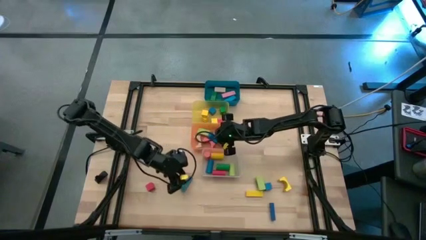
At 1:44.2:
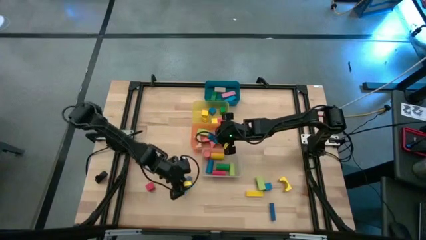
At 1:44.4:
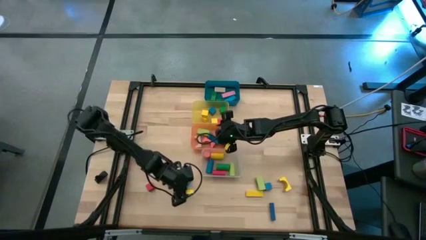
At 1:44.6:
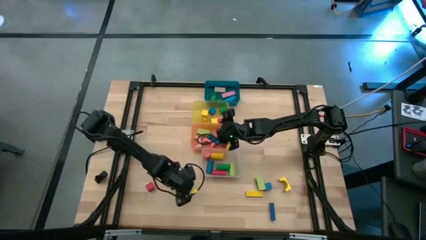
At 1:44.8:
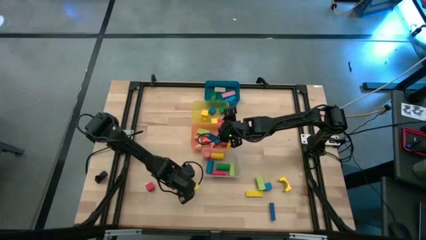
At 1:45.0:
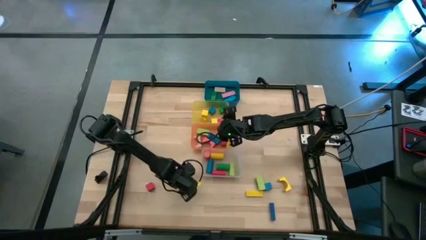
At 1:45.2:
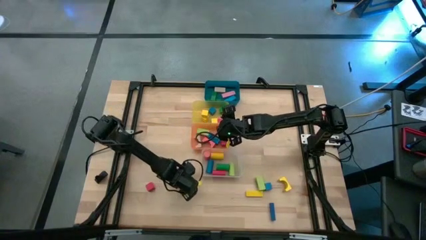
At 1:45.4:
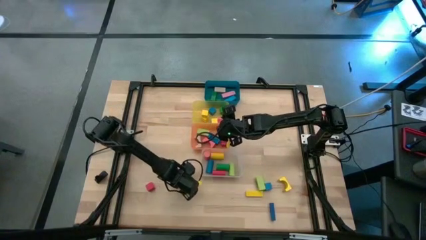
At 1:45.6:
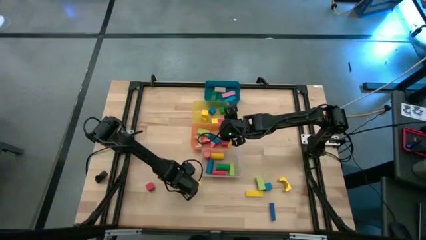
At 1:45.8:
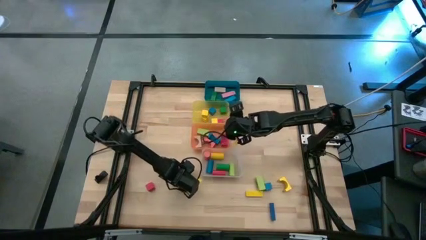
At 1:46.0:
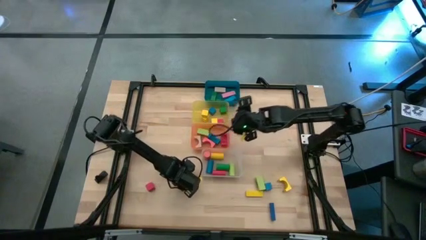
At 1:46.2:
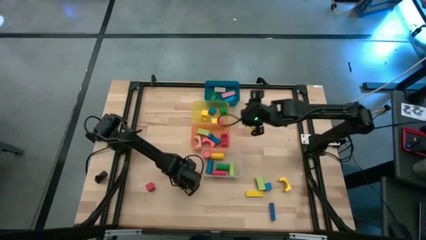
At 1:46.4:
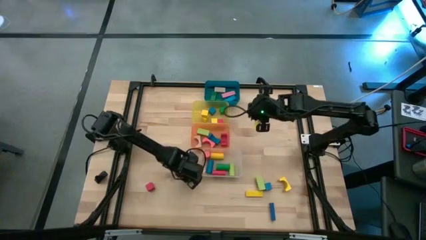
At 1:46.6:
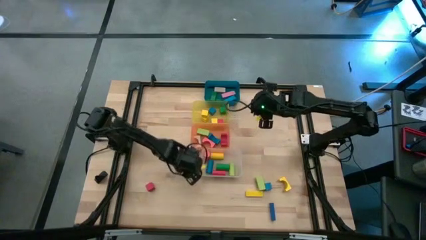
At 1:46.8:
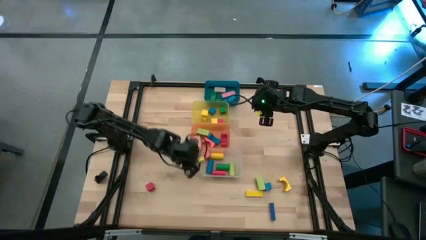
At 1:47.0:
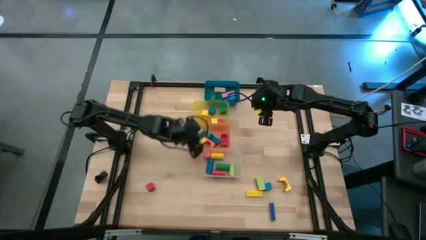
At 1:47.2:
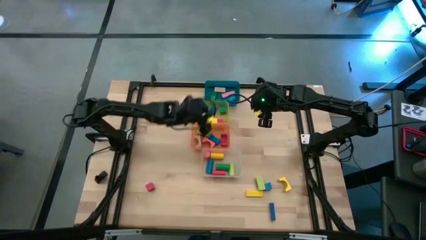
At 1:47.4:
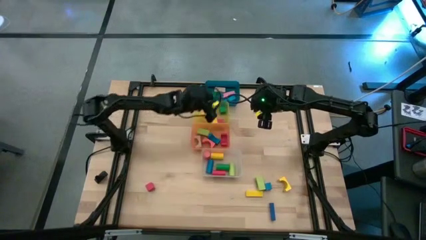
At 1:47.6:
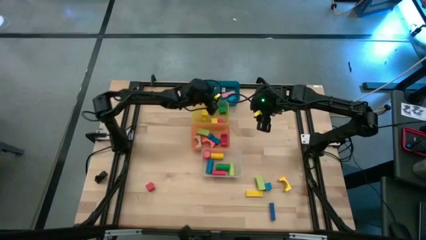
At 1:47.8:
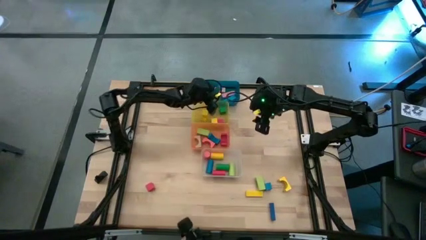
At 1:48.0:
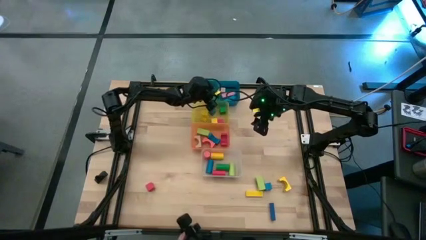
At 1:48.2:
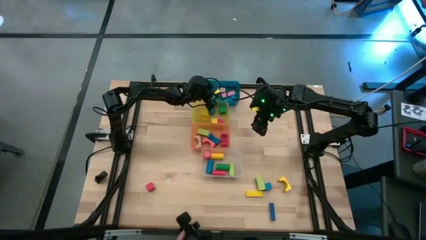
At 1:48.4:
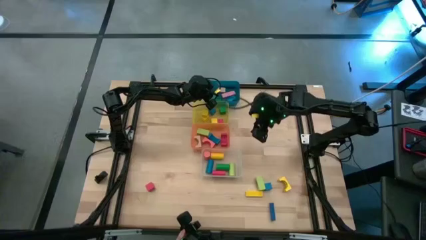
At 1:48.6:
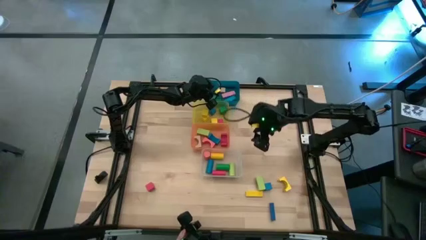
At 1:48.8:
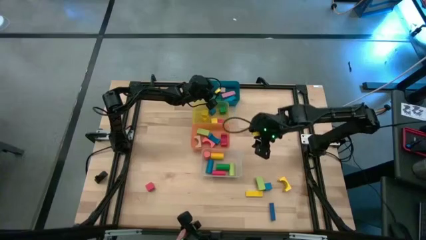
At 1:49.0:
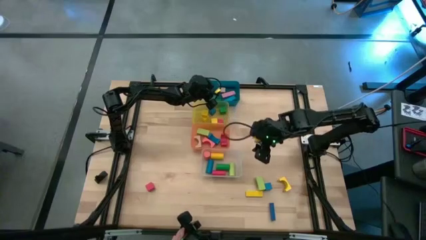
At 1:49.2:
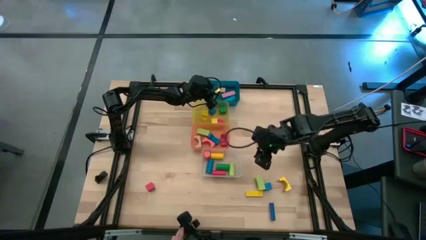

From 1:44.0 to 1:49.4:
Task: Sort blocks by size
Put the light blue rectangular block into the blue bin

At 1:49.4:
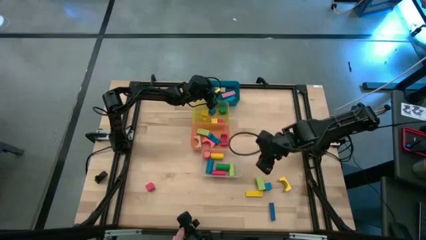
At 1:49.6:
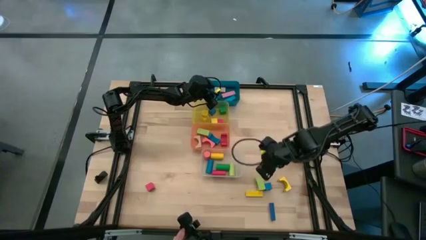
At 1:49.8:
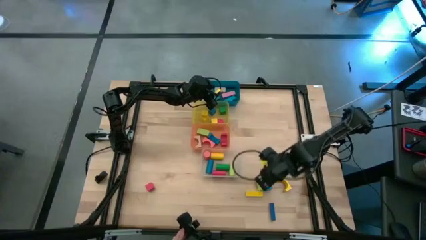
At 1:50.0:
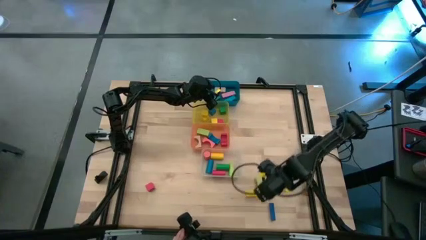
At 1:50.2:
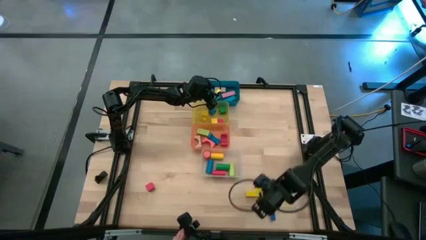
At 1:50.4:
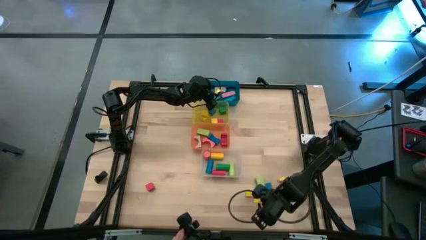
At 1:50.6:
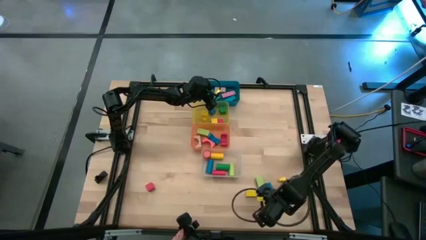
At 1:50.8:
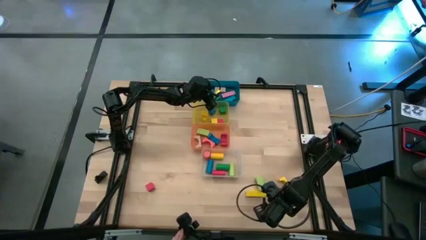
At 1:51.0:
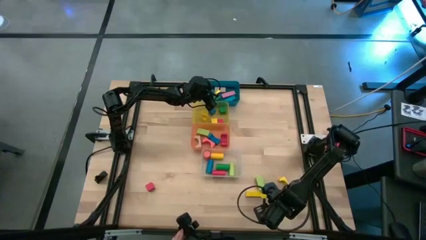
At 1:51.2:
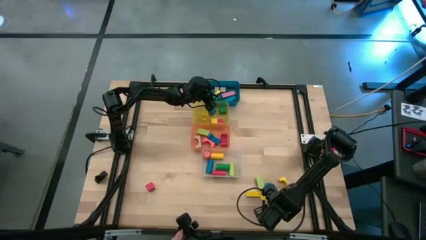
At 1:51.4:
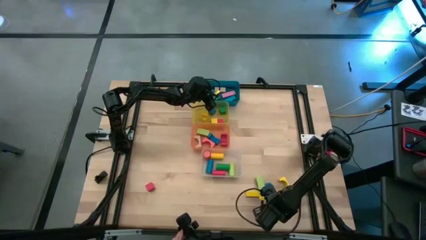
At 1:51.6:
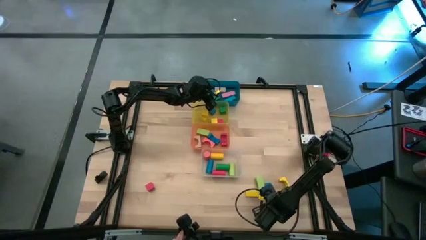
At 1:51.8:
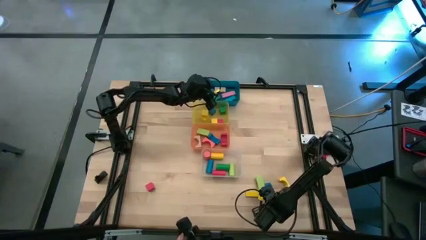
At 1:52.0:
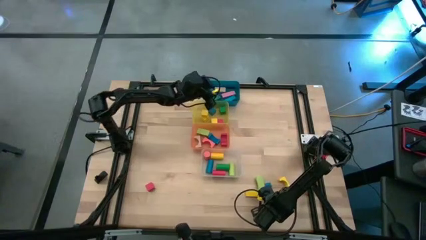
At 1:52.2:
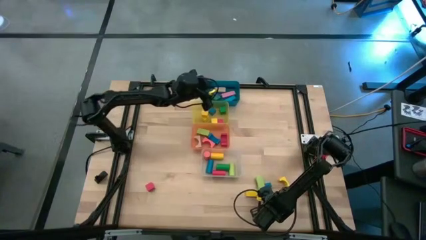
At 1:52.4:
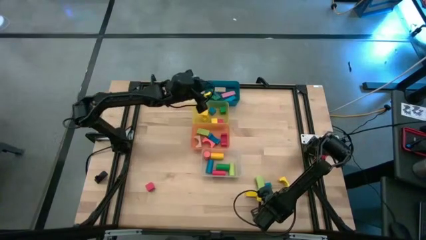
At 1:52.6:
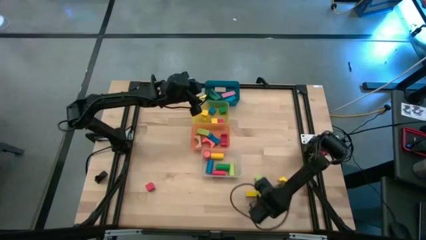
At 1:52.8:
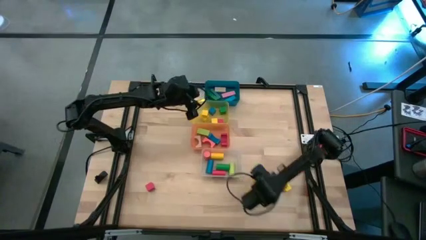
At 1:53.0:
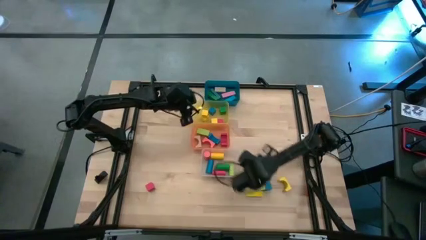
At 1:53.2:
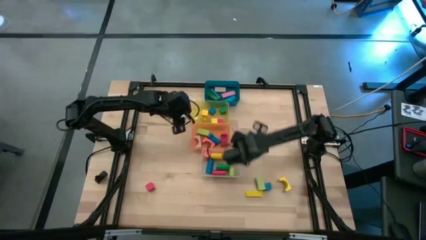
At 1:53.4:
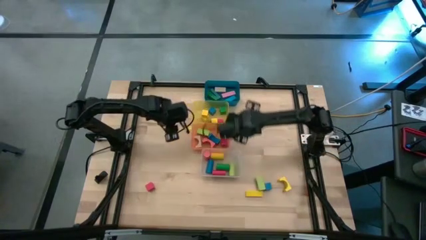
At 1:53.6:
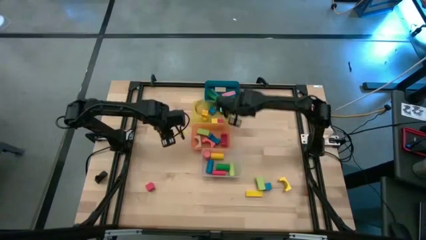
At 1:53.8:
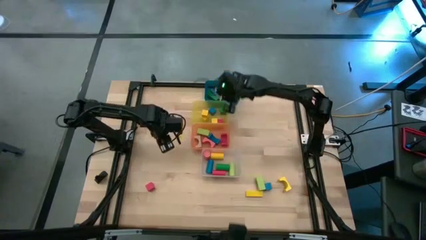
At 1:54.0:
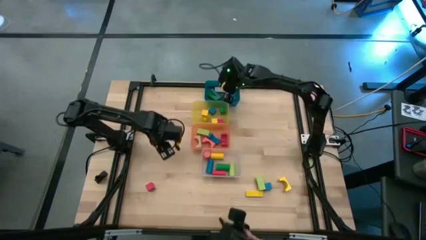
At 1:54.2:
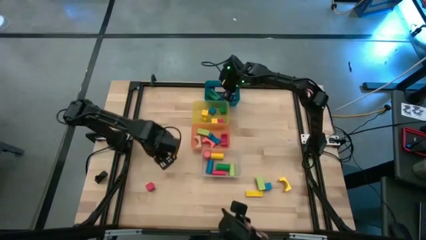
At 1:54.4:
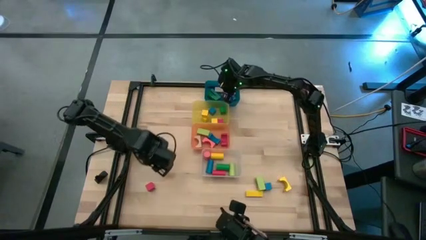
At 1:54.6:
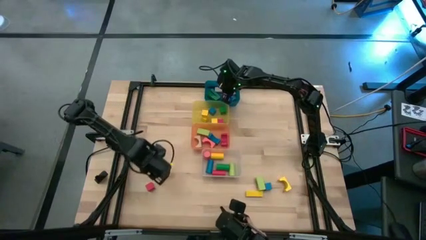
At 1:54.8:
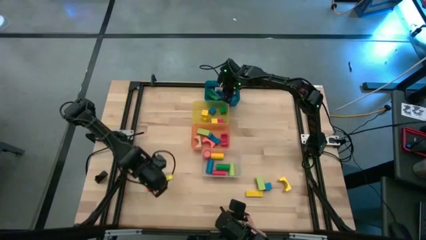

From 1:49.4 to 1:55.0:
Put the blue rectangular block into the blue bin

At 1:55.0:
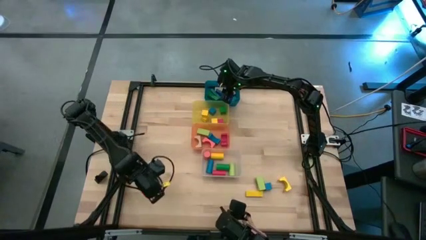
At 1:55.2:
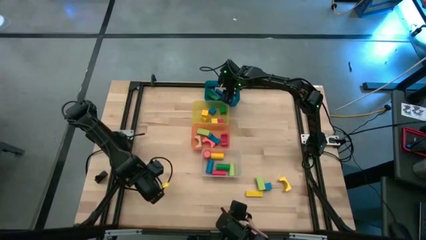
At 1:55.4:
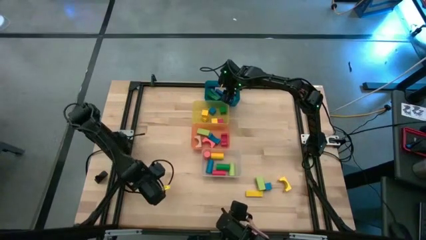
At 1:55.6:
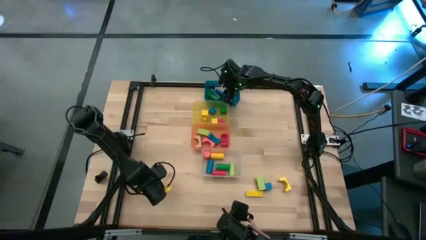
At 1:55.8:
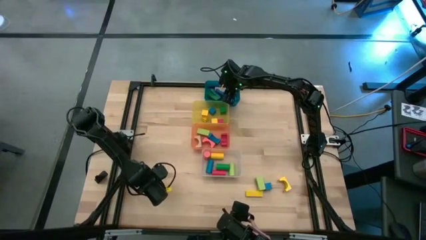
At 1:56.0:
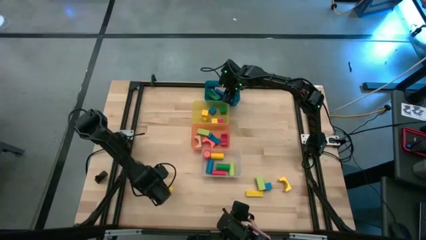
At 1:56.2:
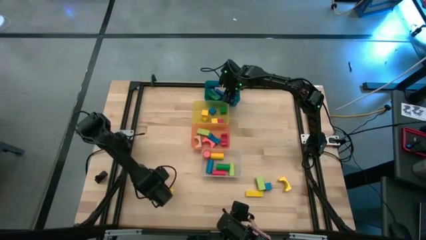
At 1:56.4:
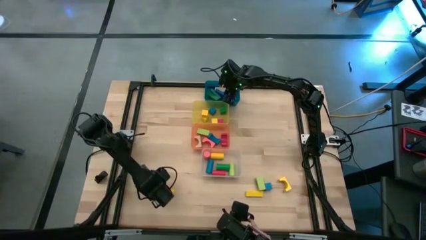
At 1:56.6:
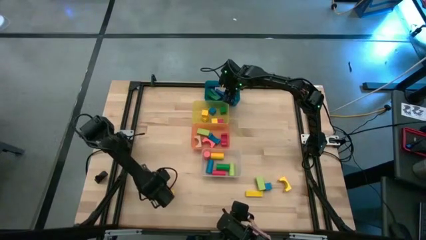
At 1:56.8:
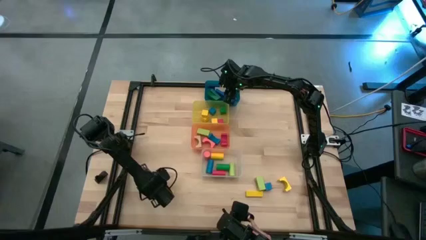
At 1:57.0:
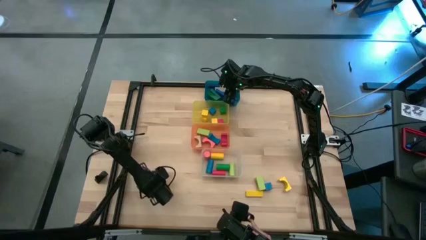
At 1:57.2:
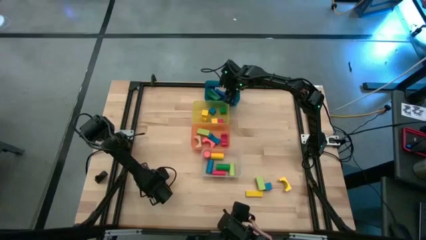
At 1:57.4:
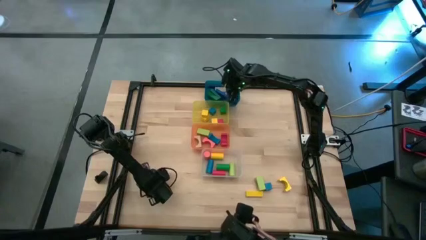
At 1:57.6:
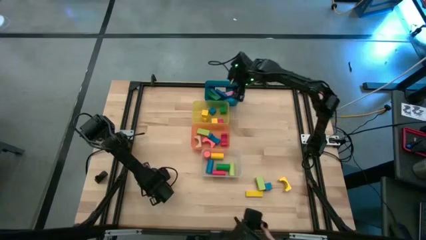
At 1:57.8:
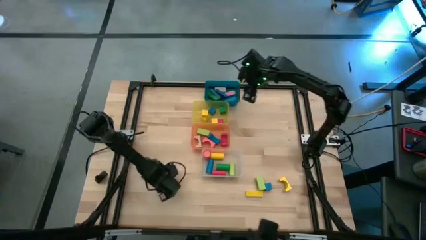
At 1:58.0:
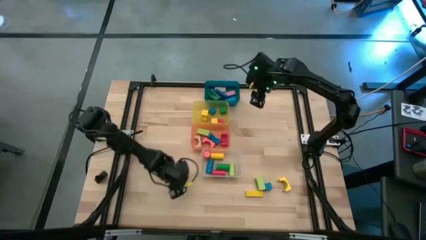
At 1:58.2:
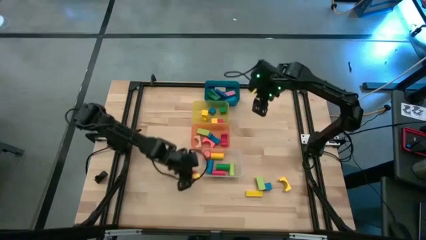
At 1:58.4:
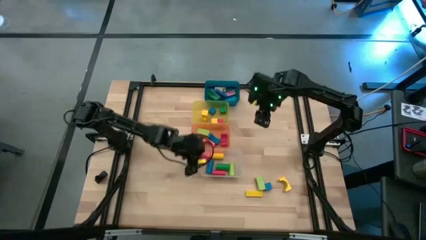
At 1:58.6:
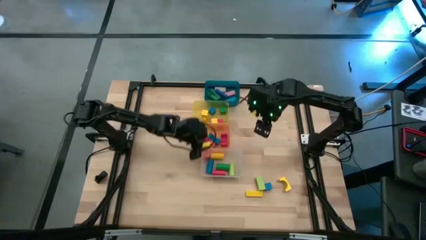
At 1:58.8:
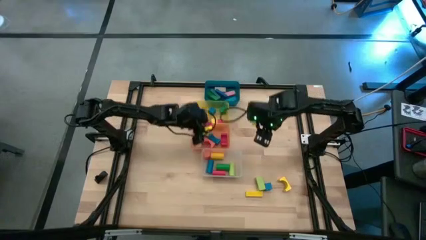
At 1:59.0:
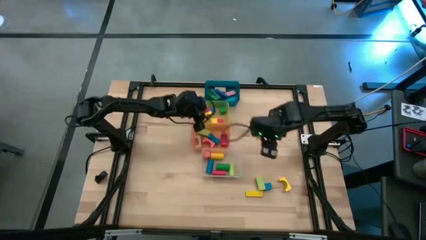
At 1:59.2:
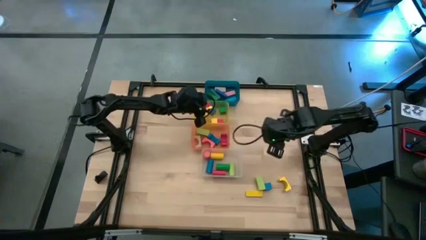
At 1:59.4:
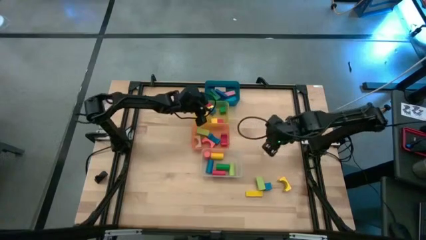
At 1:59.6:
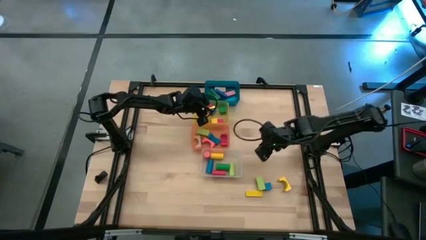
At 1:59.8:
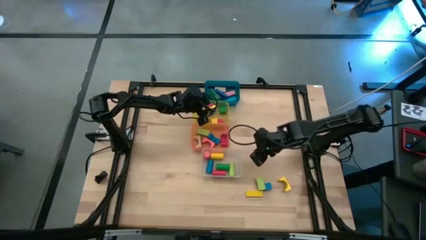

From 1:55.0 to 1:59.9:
Put the red square block into the orange bin
